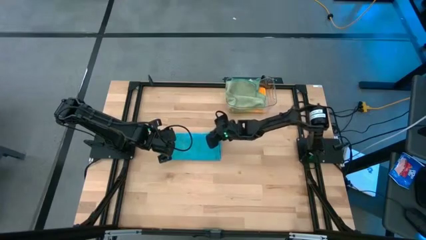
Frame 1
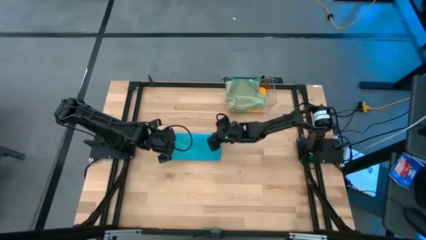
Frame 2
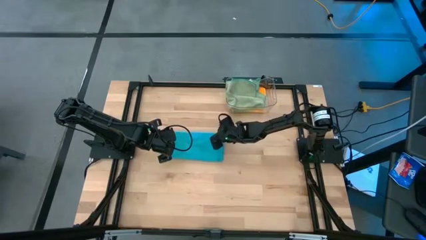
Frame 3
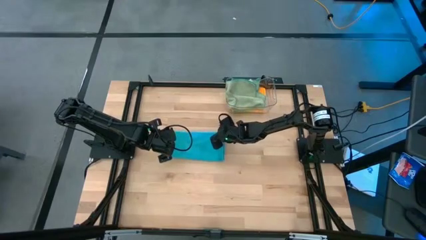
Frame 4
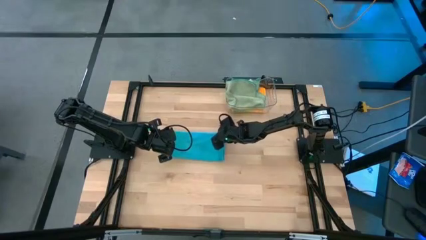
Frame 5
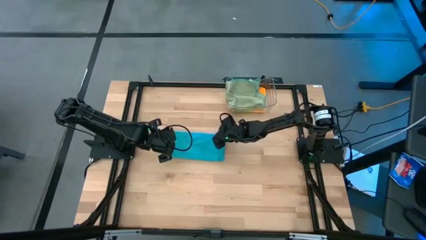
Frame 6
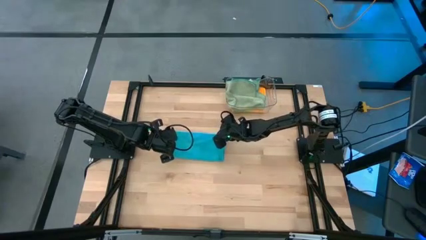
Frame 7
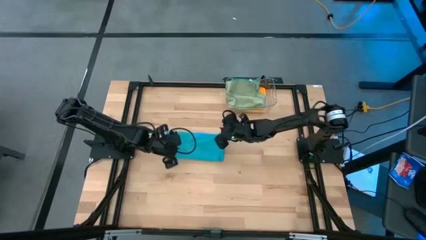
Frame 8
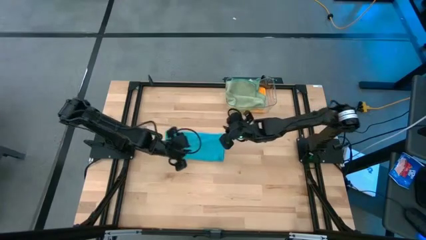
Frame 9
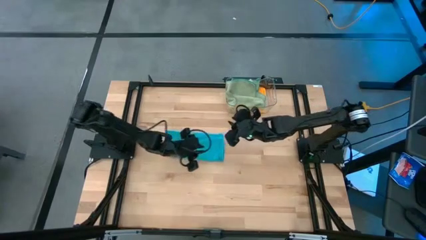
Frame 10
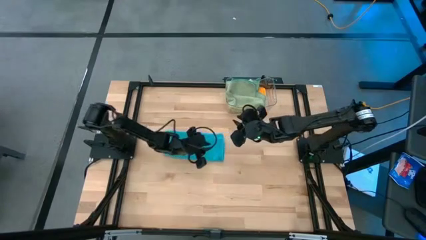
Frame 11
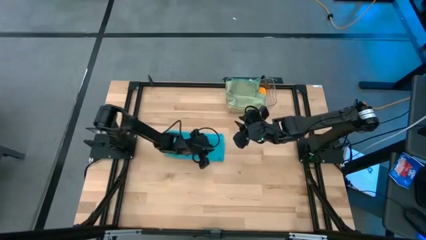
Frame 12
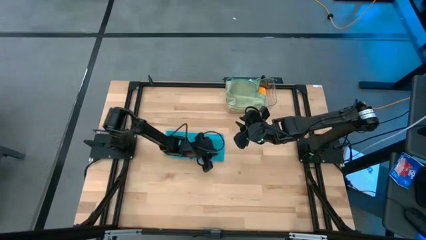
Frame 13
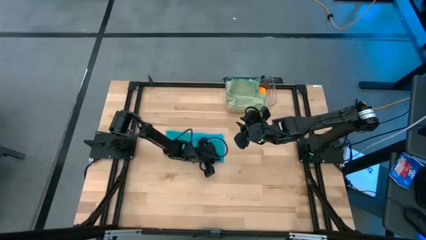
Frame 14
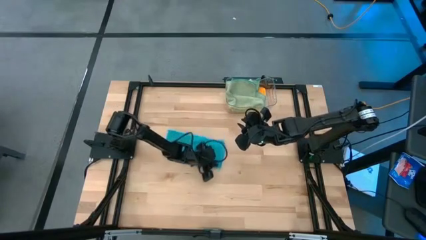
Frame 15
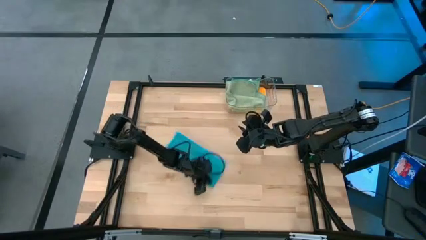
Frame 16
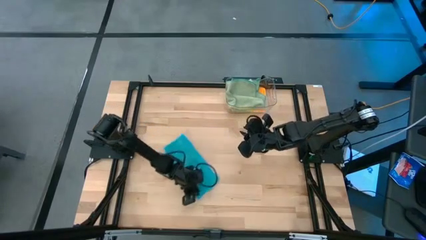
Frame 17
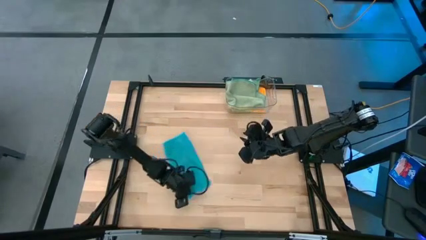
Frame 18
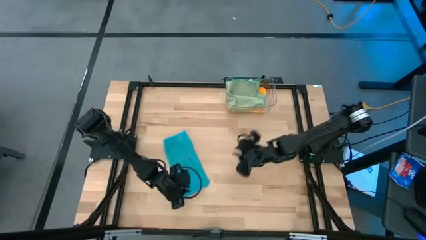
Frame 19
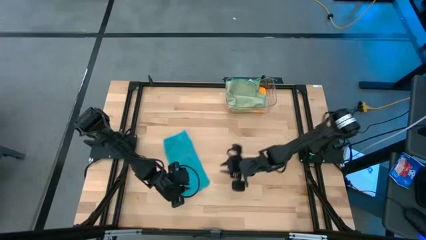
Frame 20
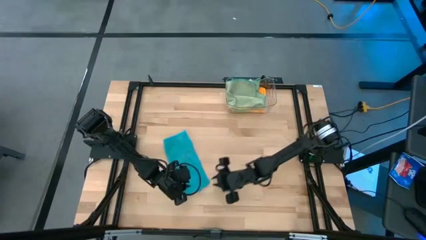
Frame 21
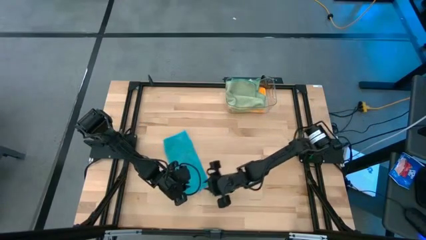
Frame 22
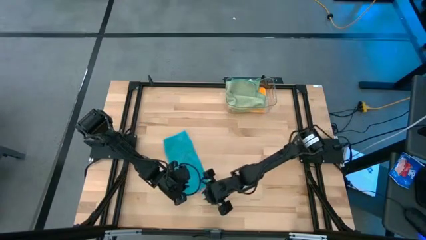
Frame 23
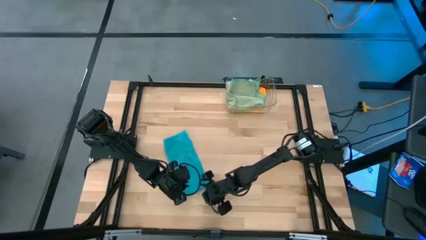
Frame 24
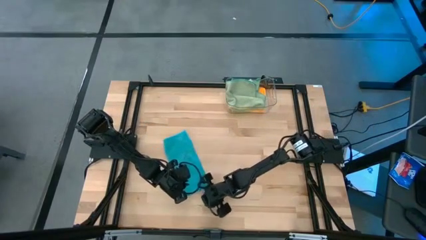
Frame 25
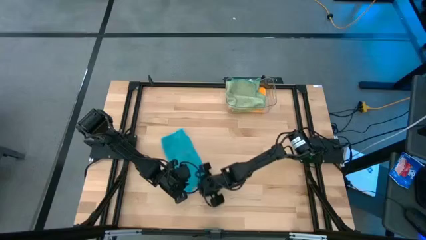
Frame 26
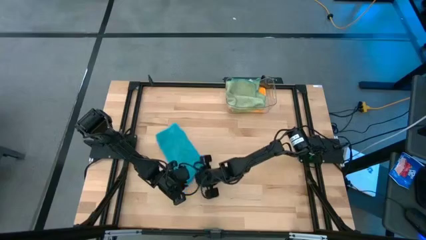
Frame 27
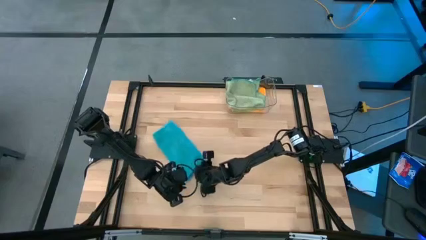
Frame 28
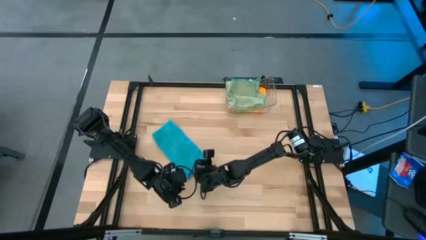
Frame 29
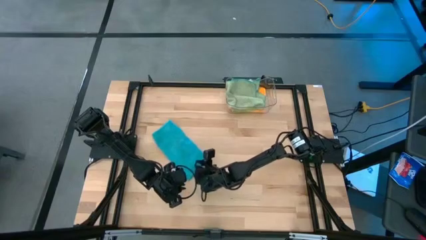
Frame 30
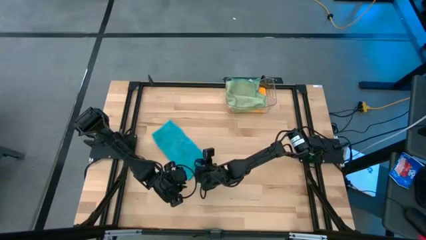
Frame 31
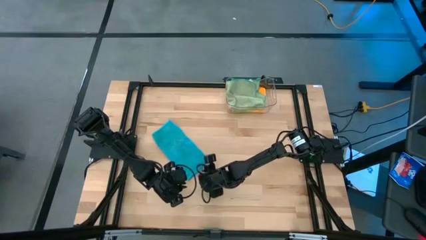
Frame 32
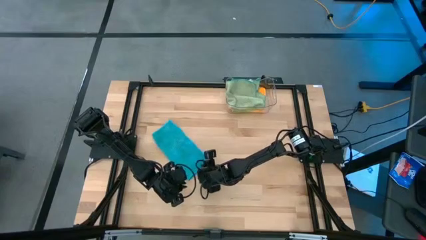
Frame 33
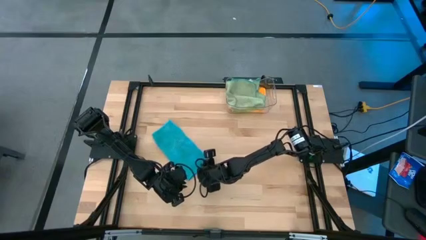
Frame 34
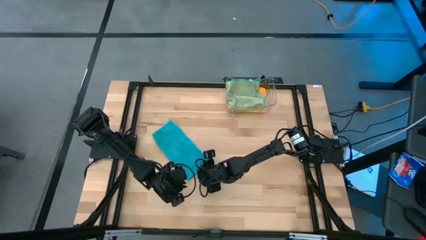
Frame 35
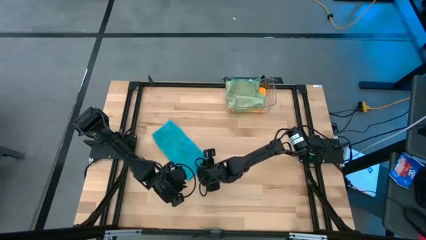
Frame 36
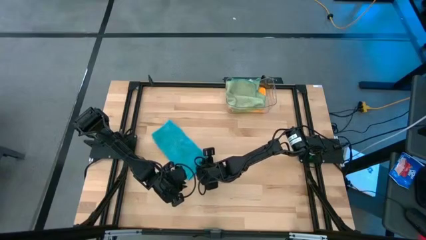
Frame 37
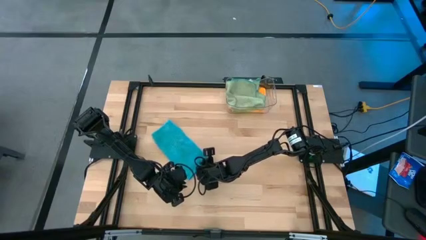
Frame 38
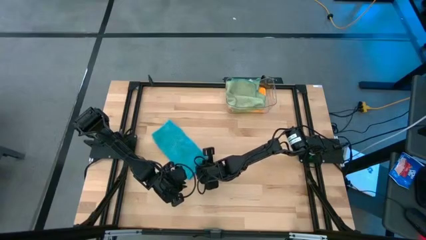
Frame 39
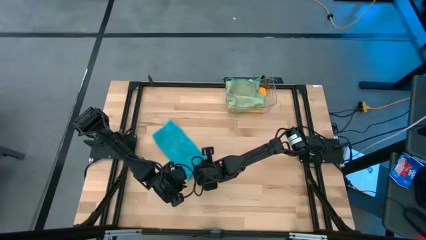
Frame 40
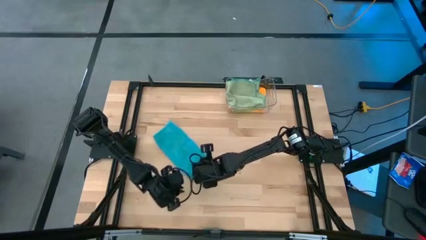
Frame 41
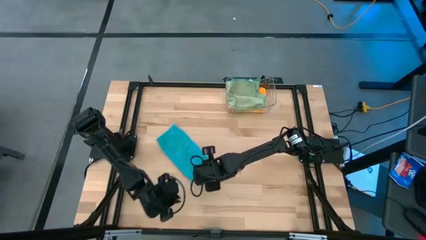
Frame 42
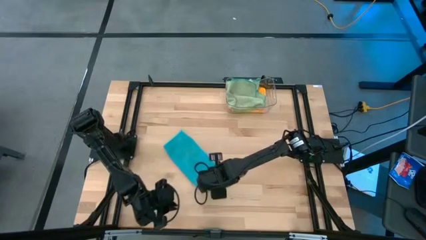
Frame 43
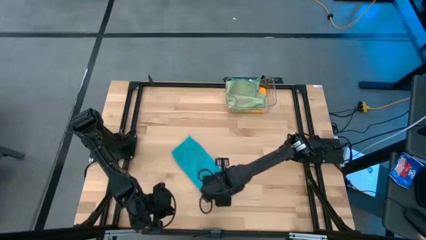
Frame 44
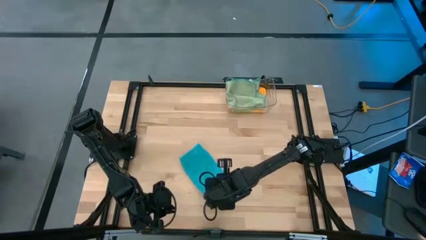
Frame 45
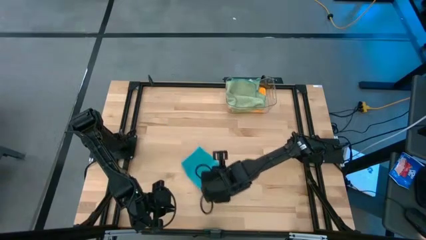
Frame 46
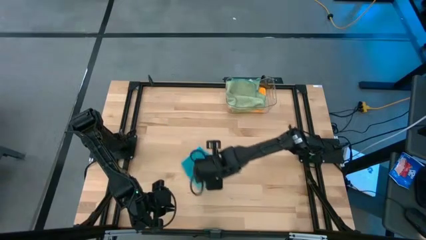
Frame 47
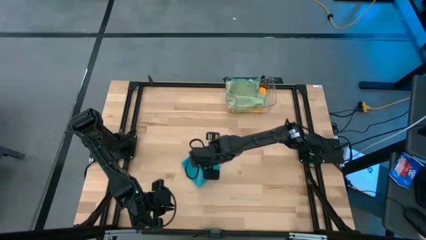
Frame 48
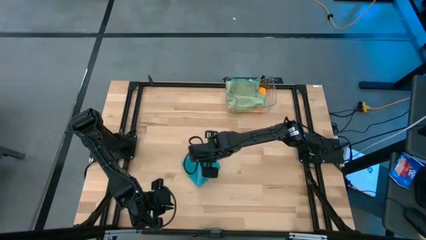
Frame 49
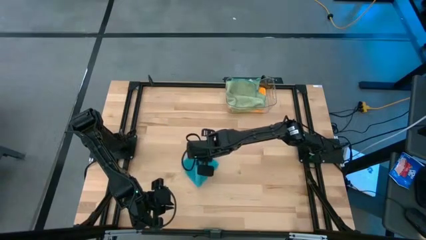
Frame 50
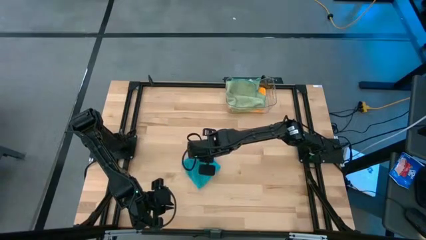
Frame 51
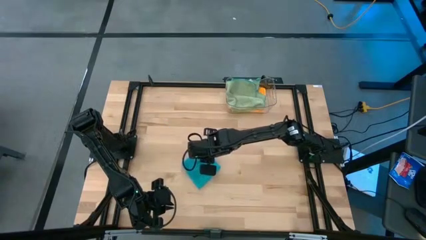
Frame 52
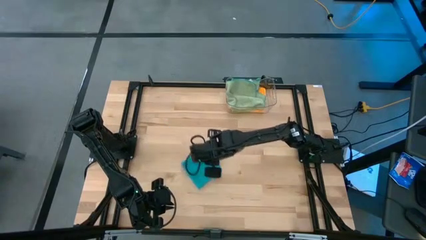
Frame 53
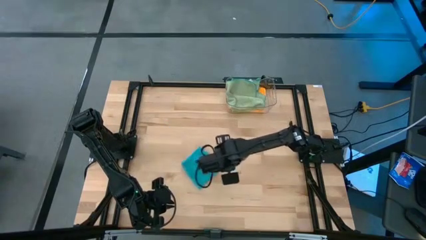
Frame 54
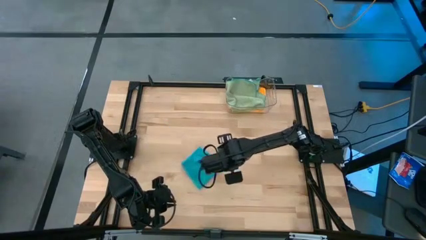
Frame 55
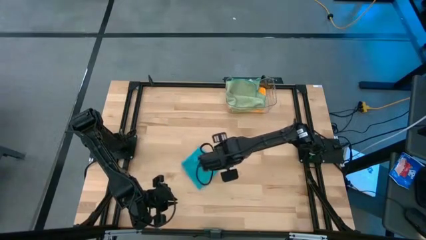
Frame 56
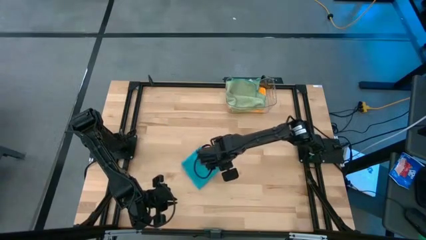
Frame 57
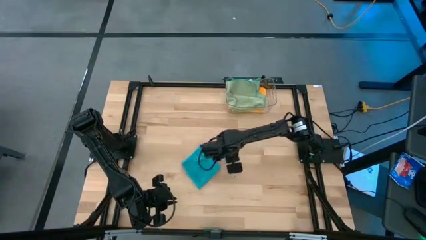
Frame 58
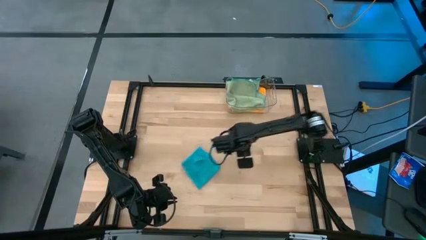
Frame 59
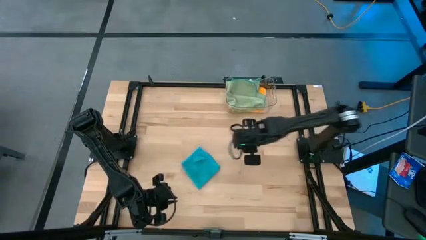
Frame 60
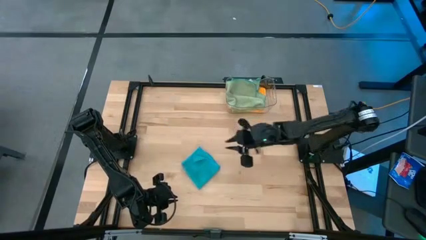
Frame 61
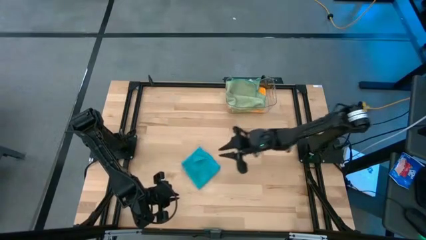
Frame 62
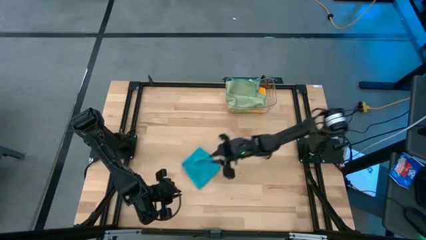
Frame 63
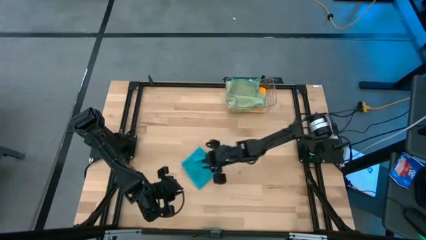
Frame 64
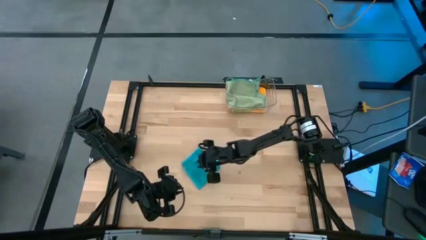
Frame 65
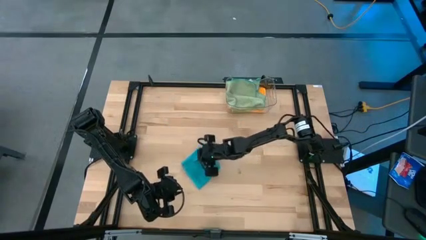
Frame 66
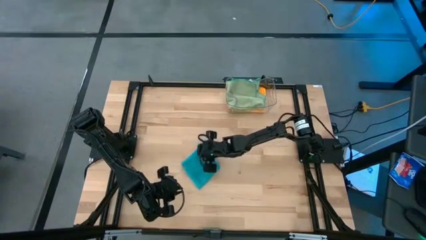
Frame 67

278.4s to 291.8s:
Task: Fold microfiber towels
Fold the blue microfiber towel

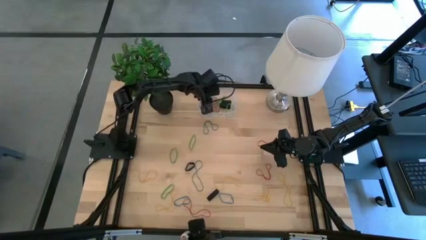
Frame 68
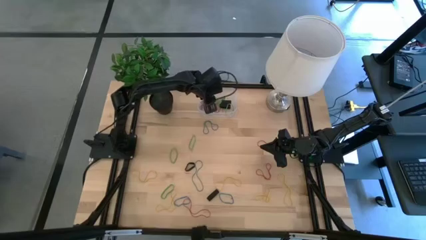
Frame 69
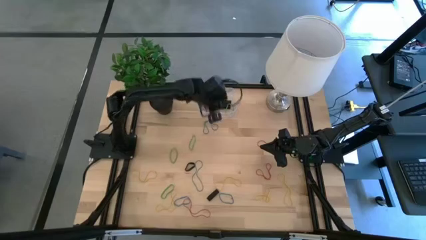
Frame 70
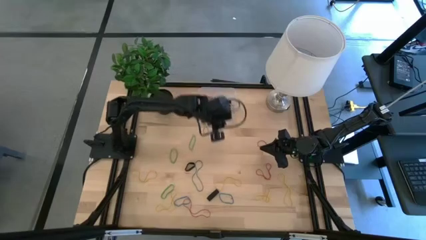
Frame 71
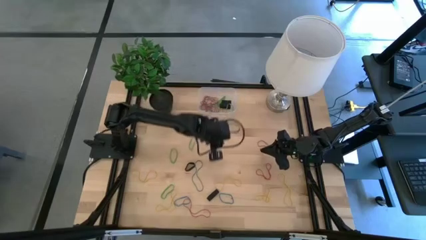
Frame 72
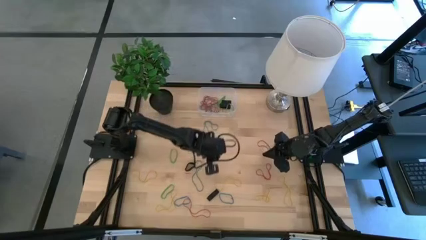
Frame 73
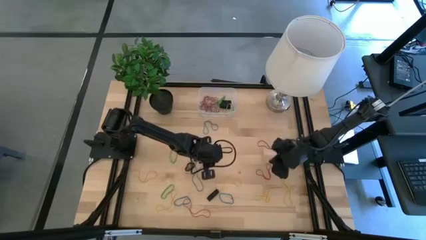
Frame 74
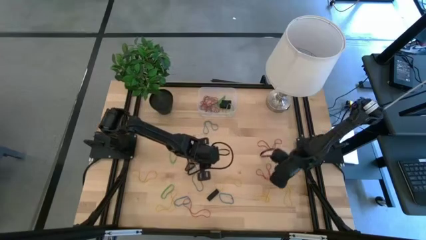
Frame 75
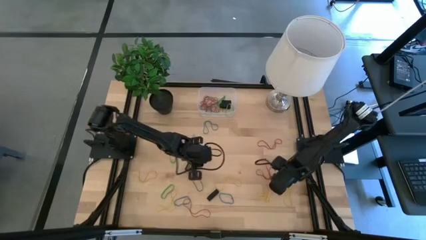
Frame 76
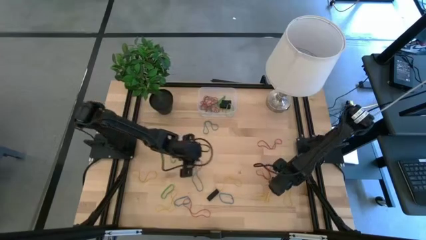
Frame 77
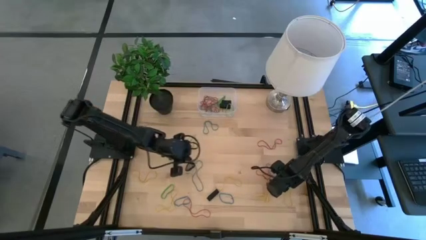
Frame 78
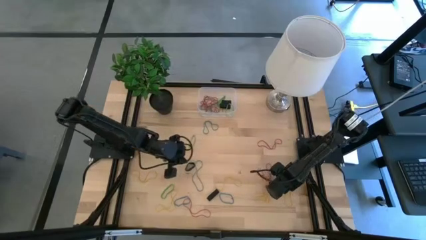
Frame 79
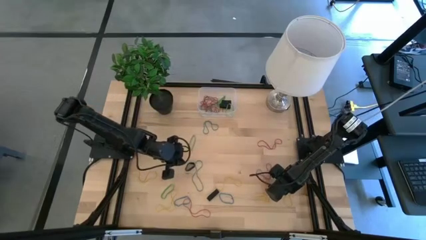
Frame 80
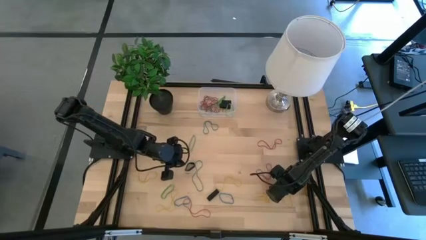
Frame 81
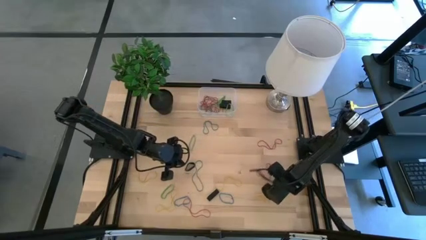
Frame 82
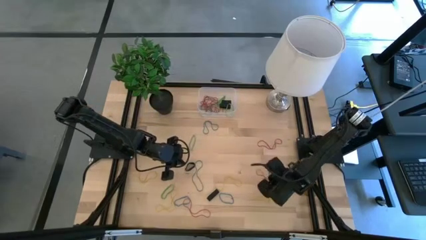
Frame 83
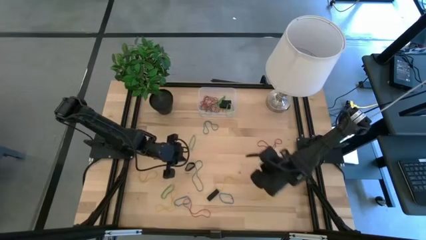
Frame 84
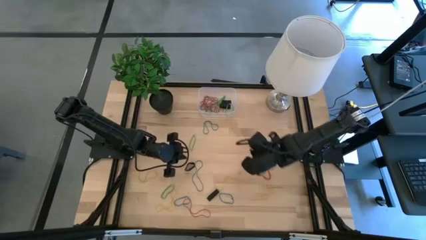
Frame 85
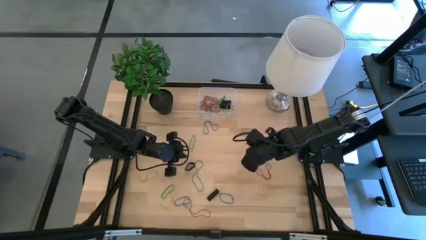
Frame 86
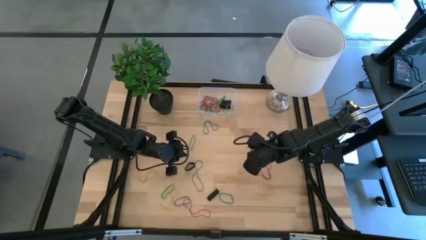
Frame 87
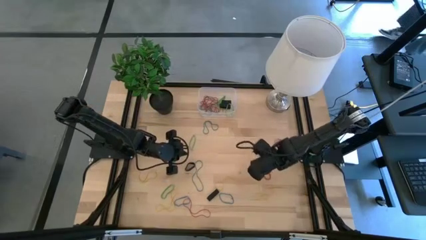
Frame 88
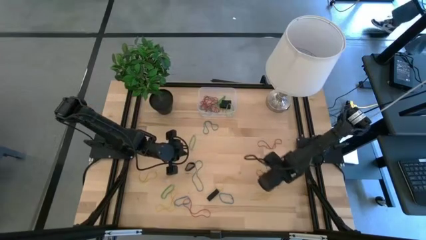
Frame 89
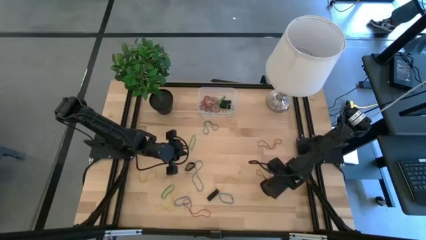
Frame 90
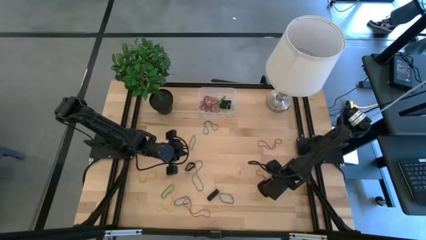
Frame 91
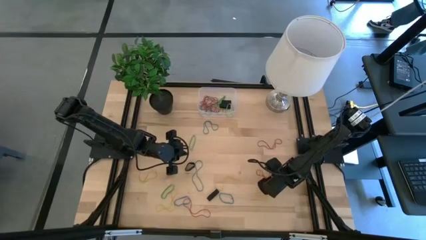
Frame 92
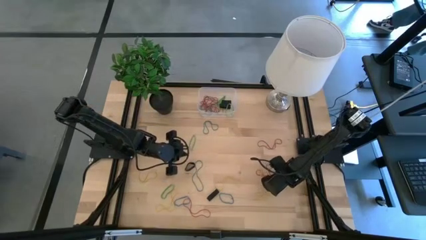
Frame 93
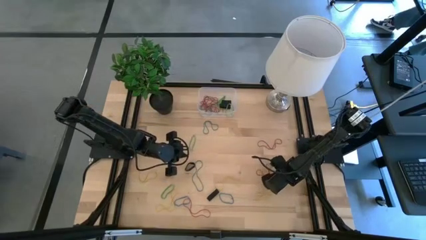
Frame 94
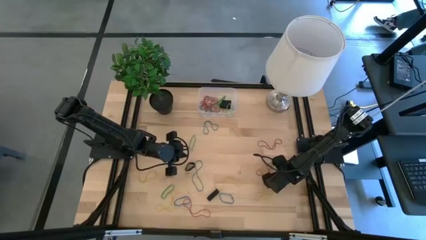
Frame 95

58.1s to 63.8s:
Task: Pick and place rubber bands into bin
Put the yellow rubber band into the transparent bin
